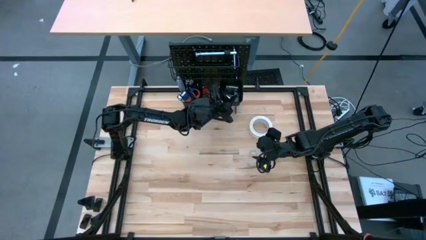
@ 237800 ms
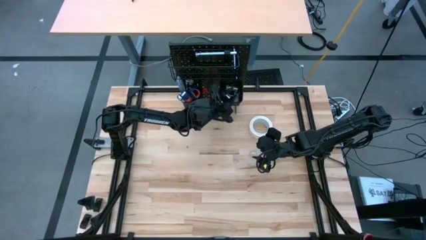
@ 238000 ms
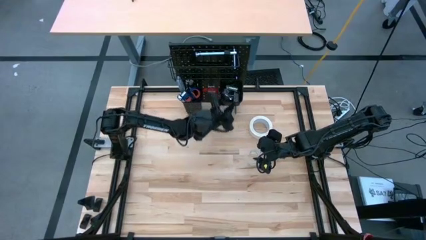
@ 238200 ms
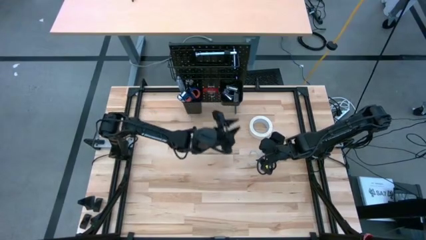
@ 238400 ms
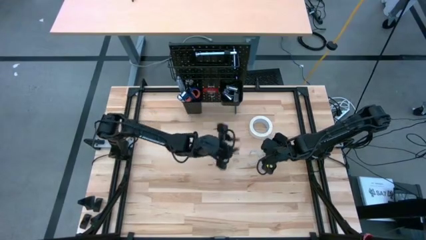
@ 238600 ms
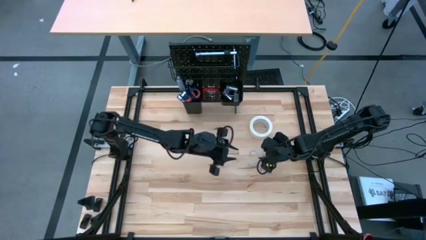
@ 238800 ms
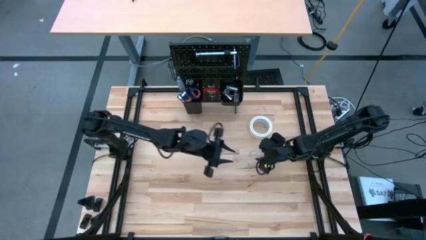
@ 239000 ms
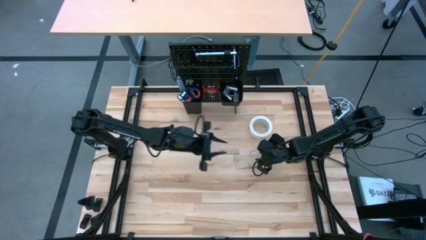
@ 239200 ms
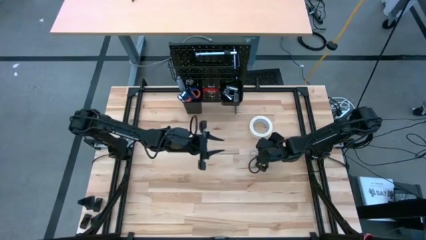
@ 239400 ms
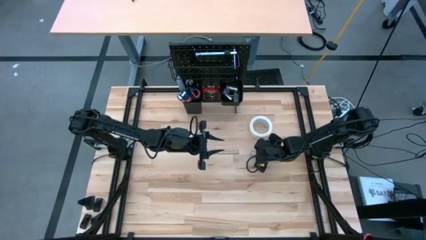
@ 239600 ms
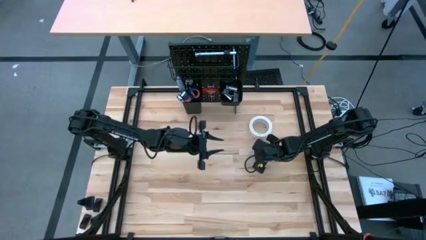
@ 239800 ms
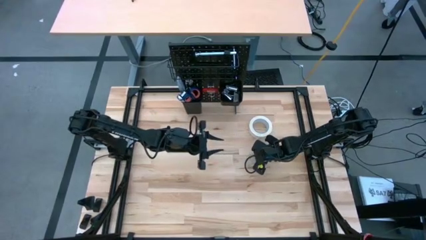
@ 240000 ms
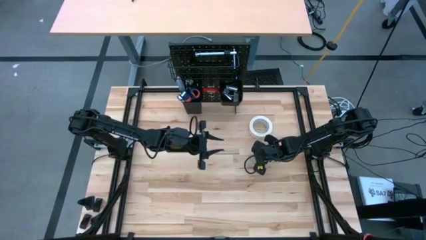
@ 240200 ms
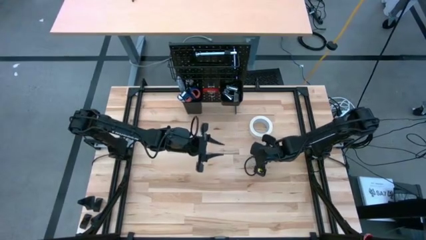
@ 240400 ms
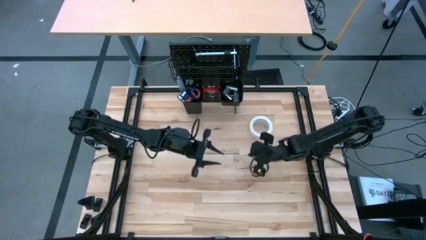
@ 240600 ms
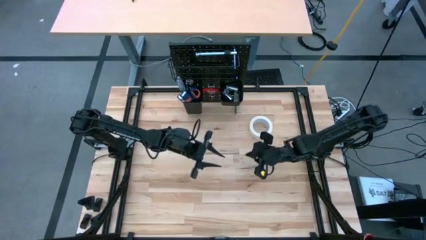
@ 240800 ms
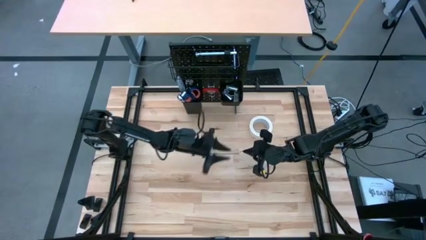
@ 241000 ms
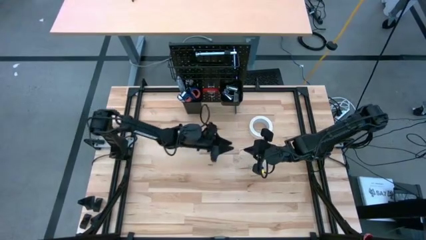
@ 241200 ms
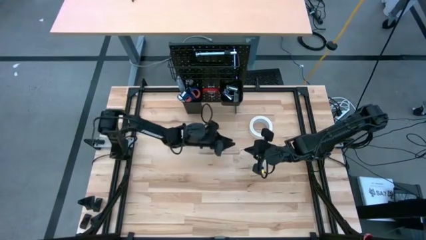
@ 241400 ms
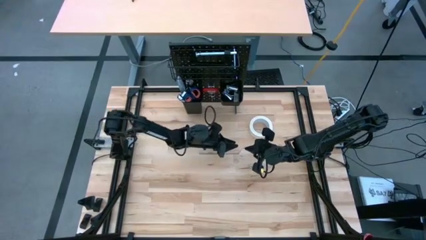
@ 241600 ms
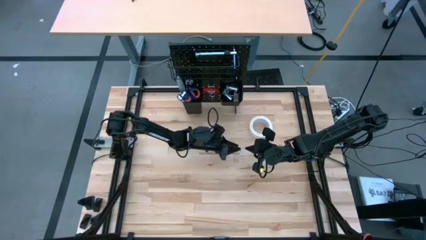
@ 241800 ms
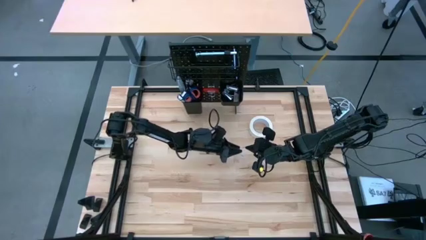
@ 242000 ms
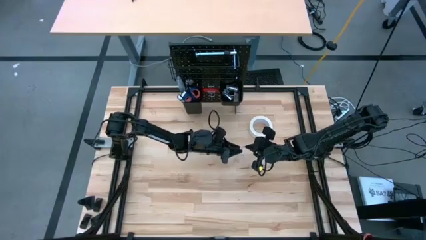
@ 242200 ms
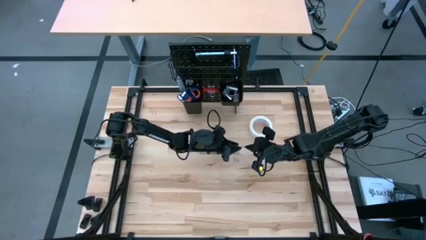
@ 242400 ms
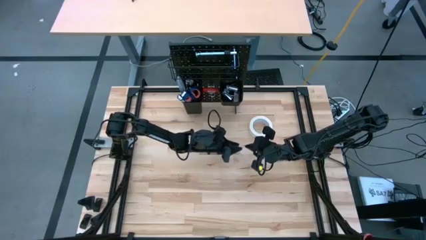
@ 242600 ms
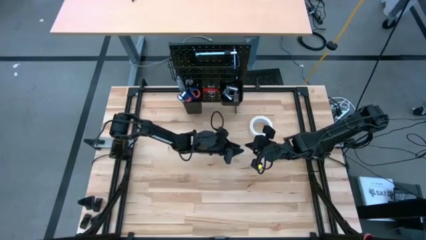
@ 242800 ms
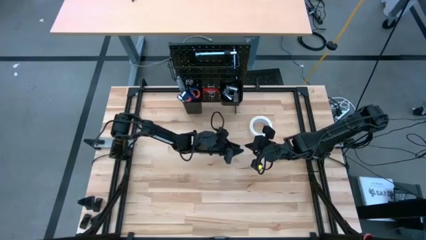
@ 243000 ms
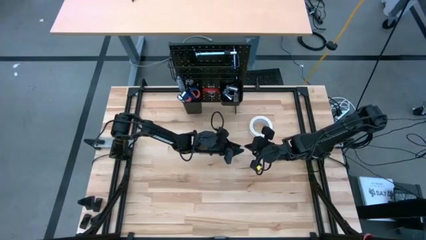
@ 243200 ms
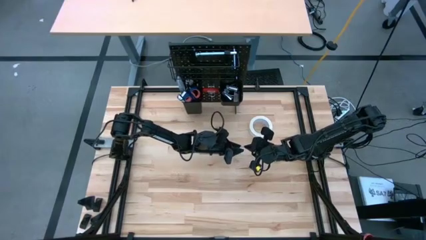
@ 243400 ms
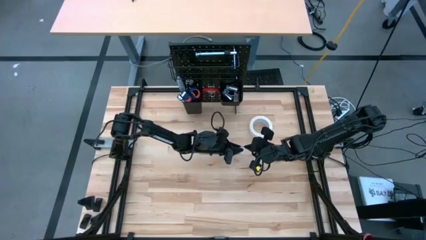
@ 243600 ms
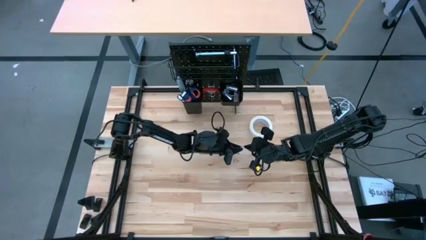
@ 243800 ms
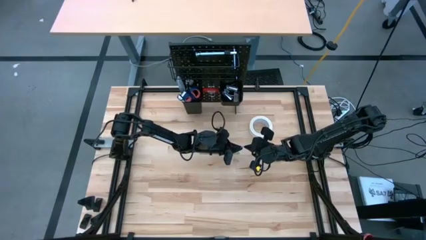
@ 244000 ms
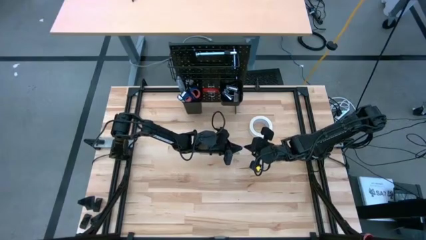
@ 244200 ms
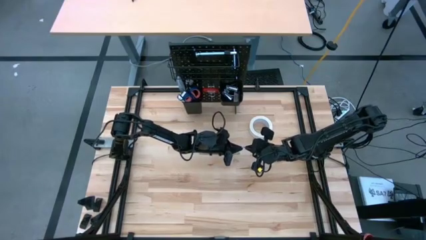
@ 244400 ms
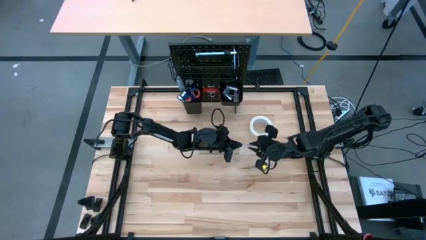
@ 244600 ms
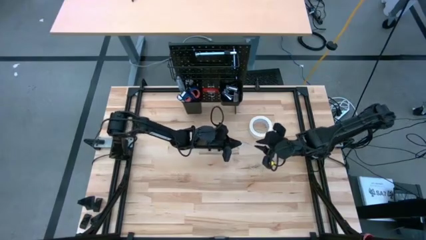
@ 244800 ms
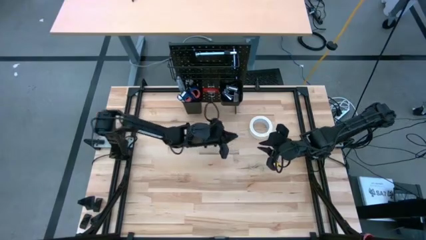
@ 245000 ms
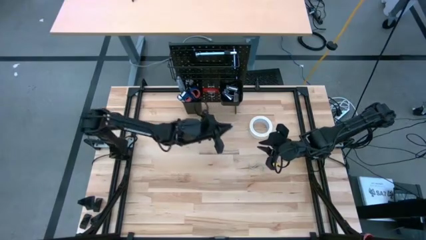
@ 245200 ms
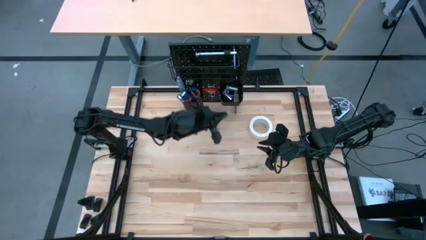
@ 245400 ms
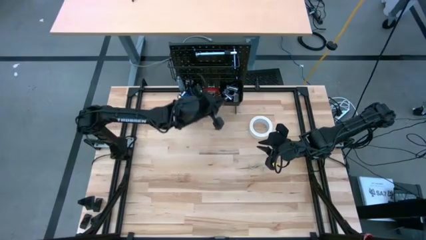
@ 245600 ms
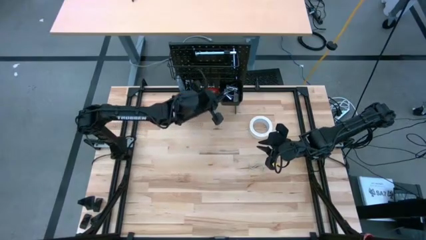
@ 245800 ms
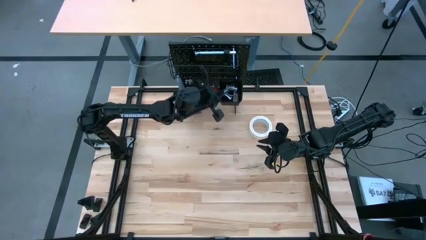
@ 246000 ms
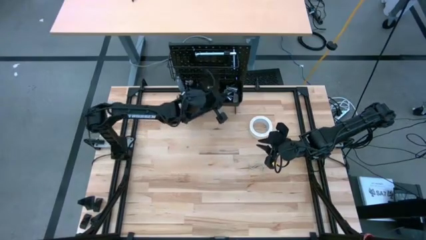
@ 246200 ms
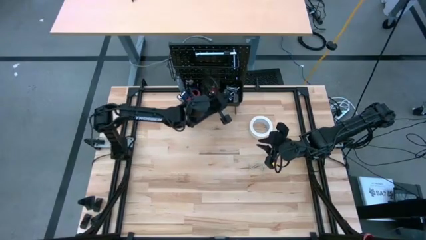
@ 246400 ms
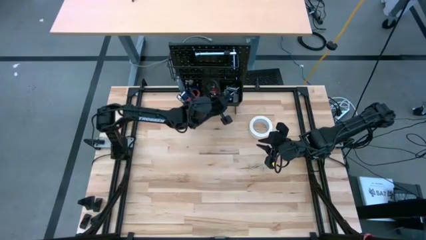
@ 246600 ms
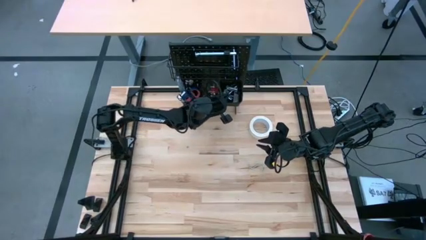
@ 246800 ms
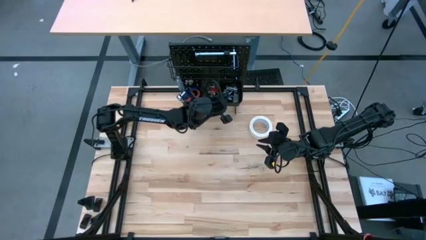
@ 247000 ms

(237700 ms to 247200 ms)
Task: Hang tools onto peg board
Put the top hanger hook into the right black bin on the peg board

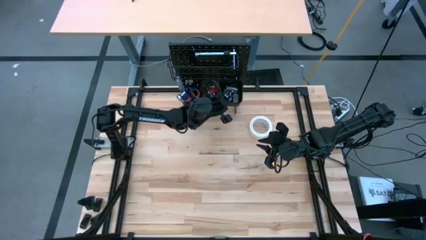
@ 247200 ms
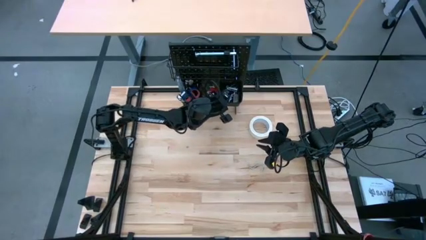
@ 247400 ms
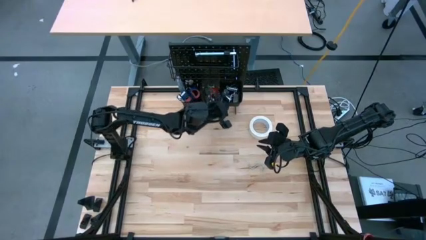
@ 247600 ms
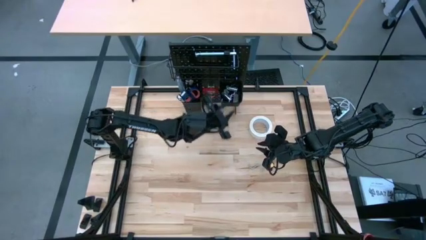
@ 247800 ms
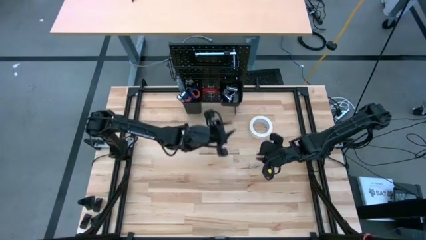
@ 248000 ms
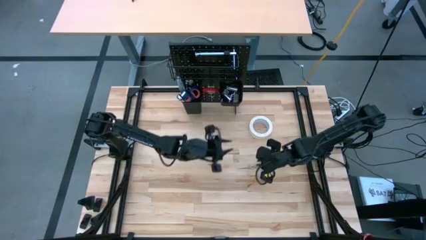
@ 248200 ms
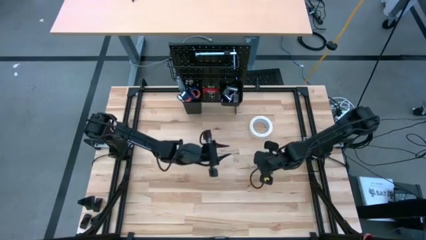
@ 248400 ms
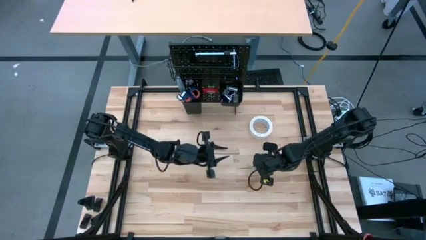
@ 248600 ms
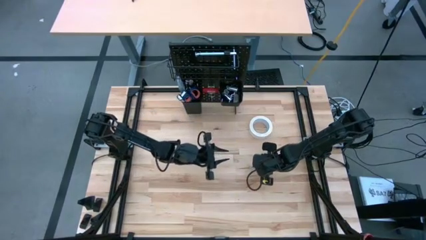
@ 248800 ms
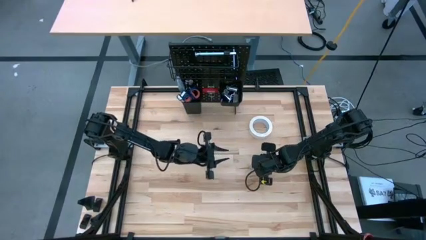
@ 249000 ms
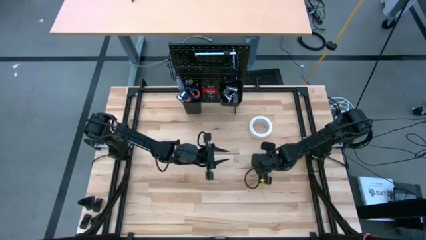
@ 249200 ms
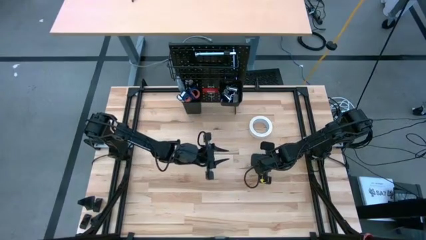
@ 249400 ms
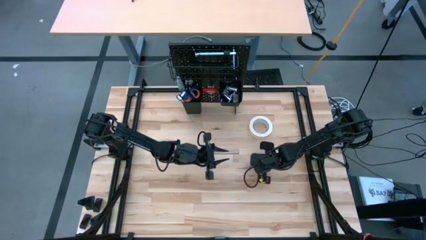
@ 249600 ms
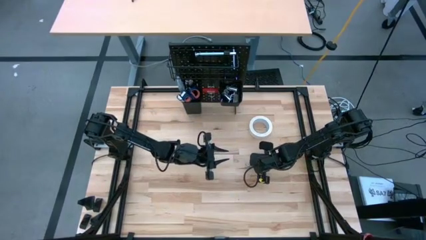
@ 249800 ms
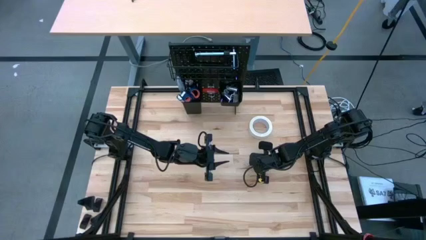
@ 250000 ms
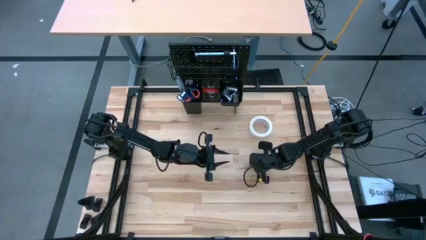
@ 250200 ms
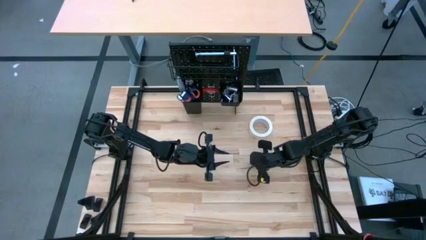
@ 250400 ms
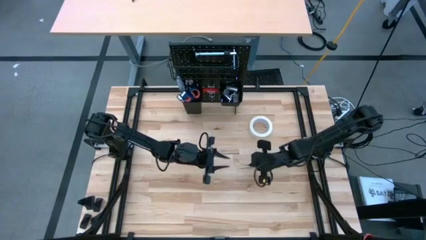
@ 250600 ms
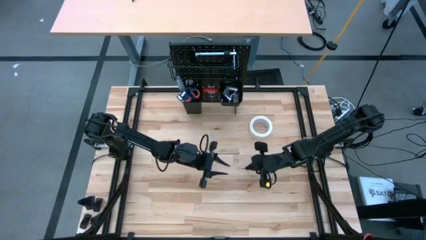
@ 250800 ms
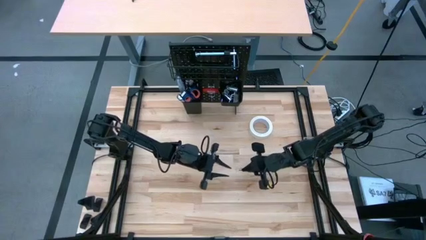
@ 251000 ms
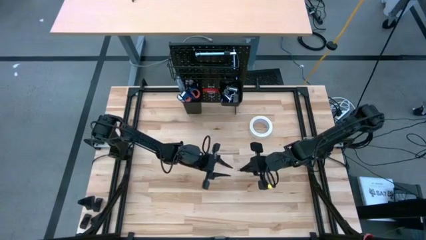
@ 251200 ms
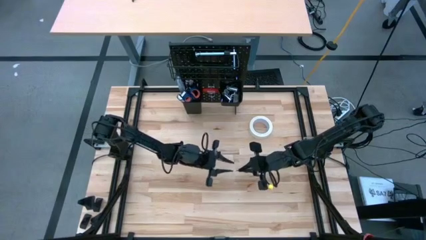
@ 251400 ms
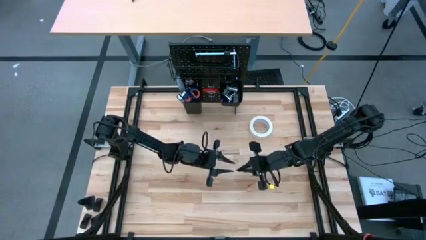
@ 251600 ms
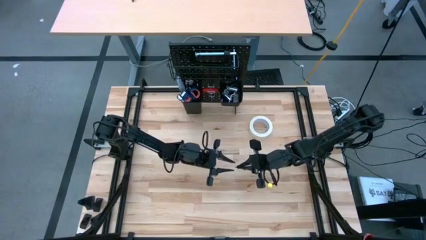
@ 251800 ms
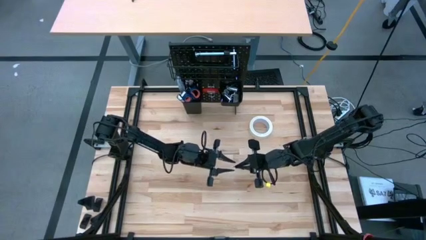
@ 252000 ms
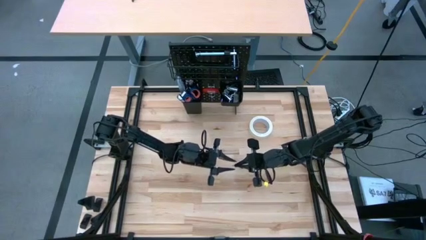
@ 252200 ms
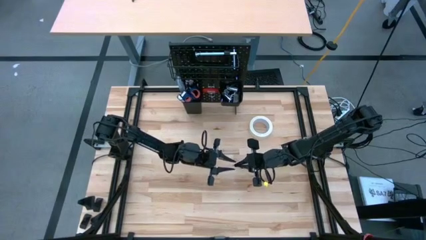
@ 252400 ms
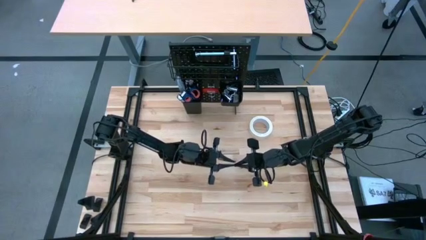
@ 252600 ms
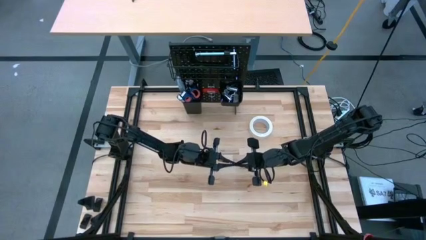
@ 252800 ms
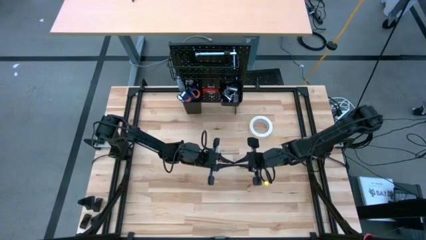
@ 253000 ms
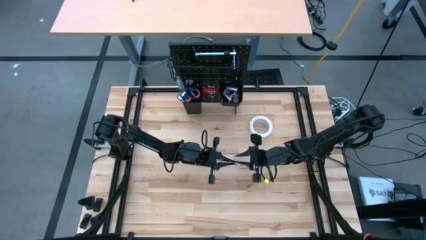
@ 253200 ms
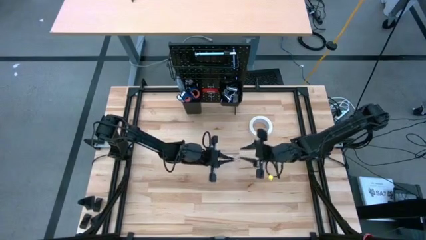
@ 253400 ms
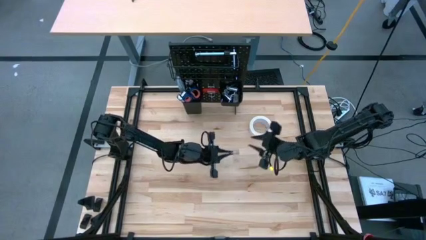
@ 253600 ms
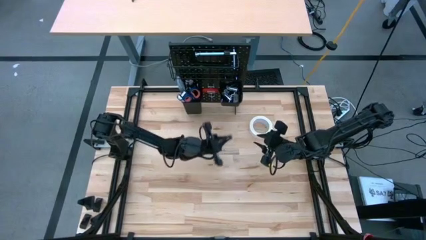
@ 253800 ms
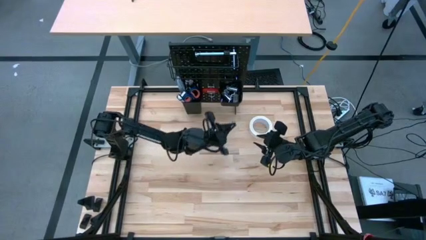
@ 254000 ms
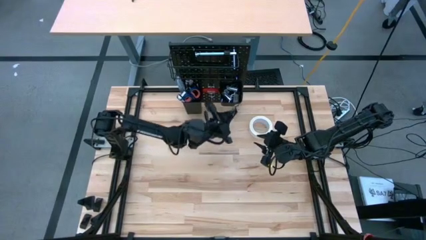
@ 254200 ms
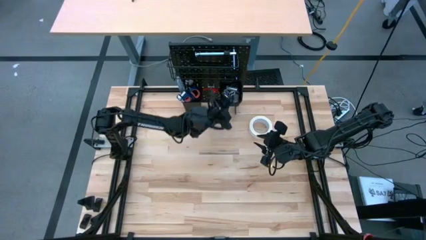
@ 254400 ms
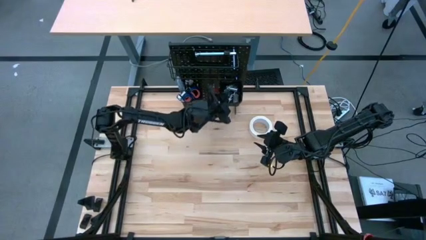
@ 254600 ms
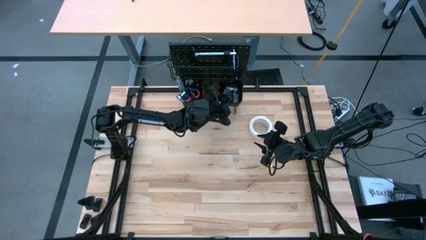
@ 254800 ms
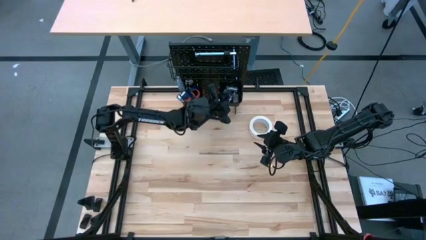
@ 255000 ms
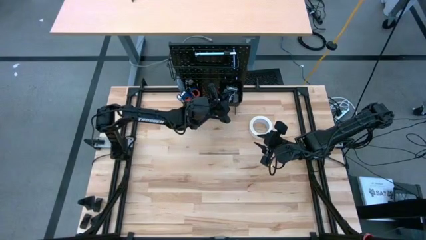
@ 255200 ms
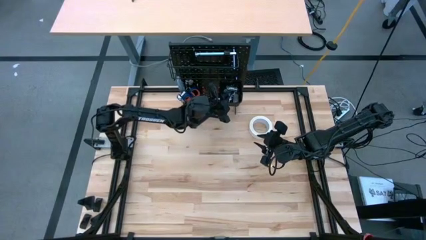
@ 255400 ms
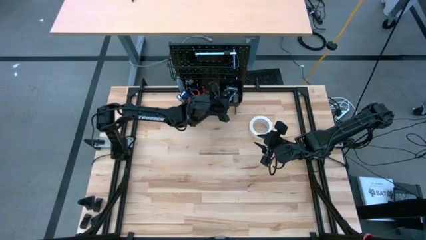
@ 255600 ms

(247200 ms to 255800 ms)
Put the hanger hook into the right black bin on the peg board
